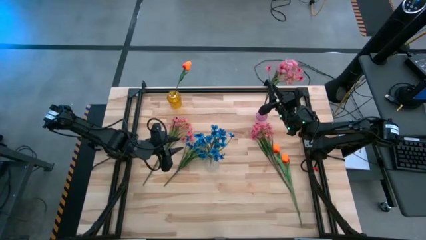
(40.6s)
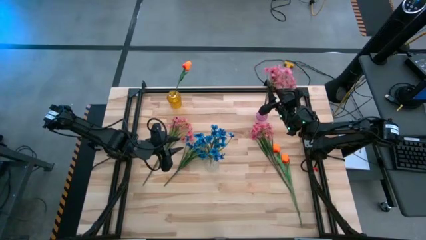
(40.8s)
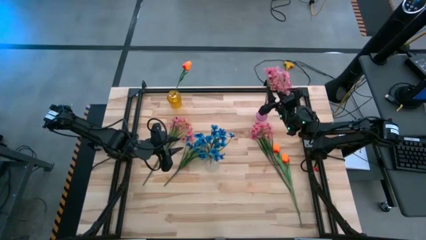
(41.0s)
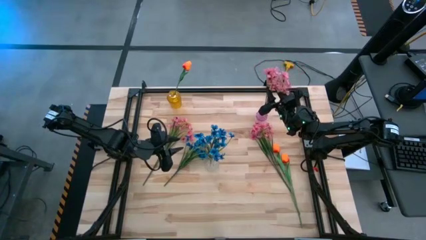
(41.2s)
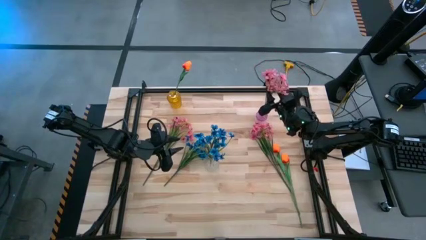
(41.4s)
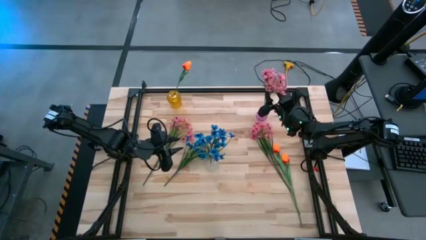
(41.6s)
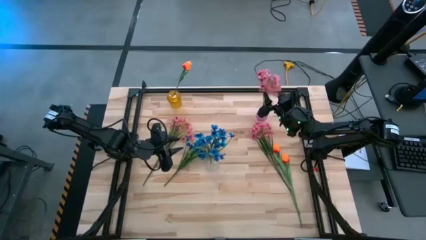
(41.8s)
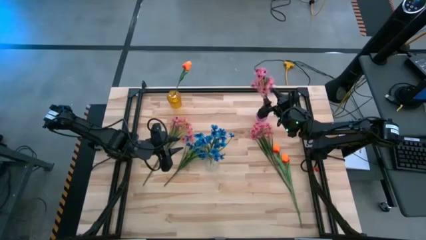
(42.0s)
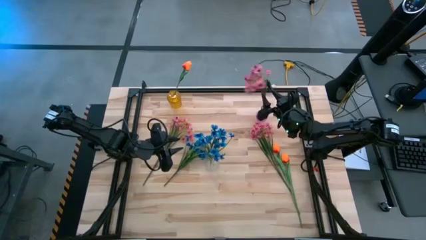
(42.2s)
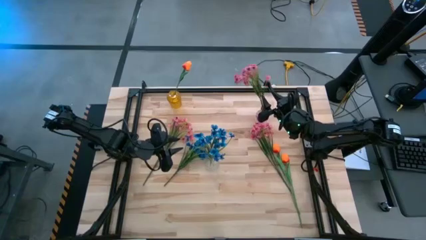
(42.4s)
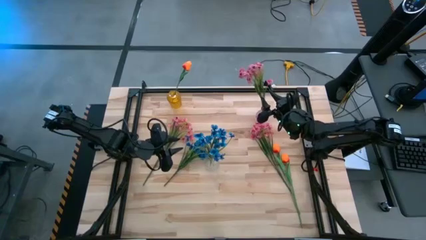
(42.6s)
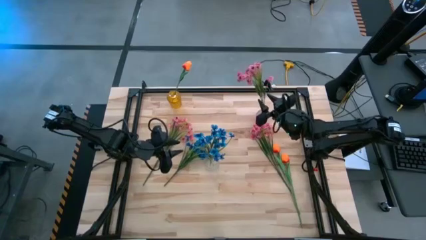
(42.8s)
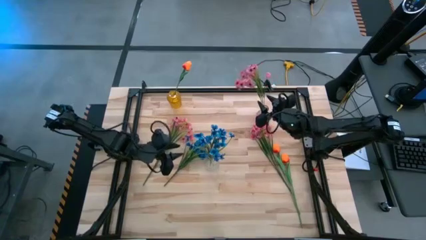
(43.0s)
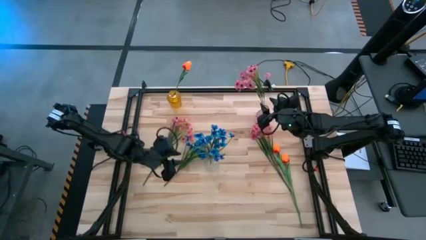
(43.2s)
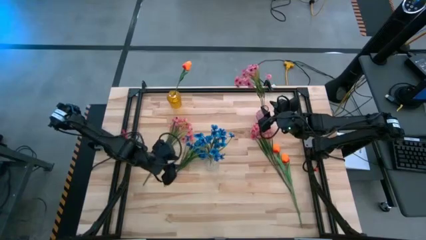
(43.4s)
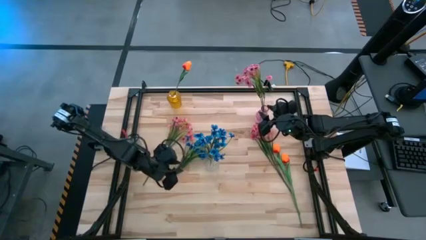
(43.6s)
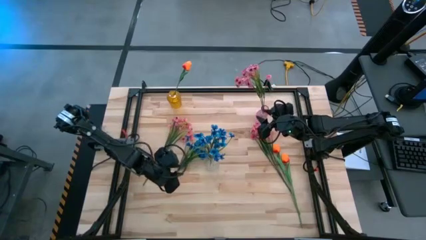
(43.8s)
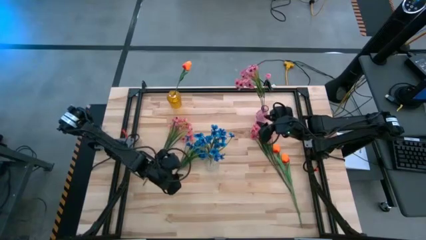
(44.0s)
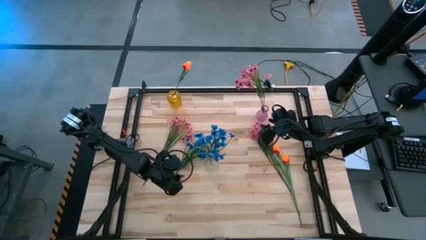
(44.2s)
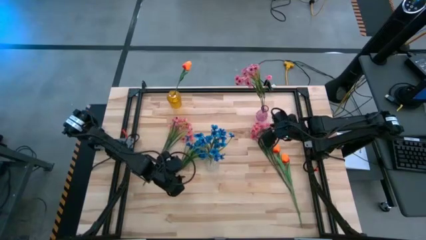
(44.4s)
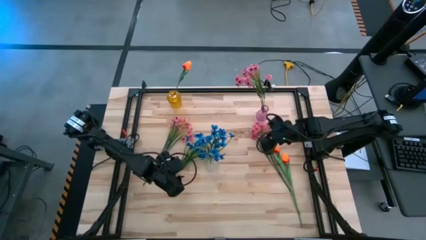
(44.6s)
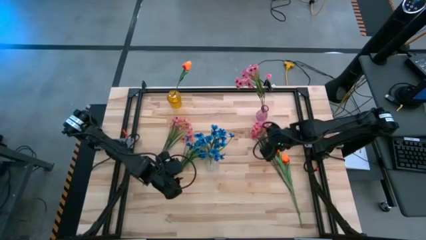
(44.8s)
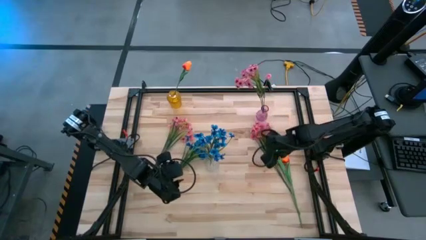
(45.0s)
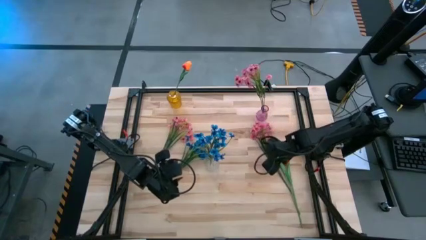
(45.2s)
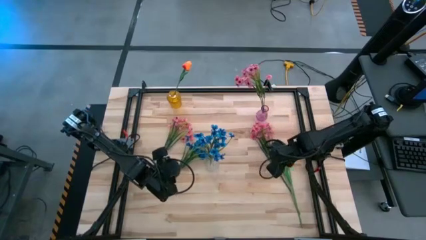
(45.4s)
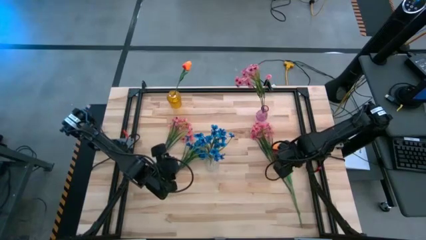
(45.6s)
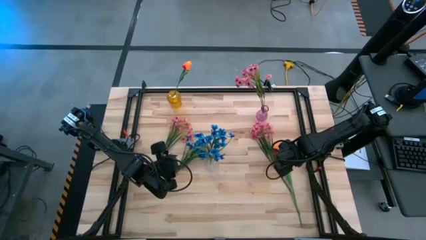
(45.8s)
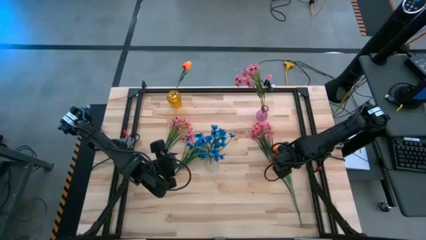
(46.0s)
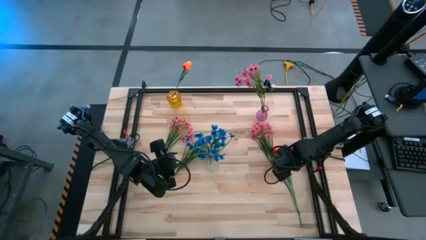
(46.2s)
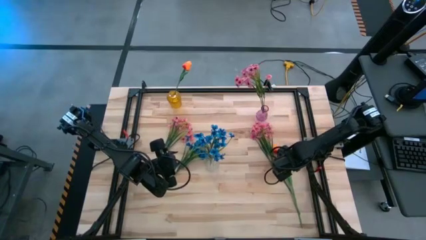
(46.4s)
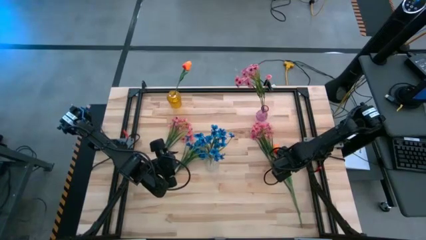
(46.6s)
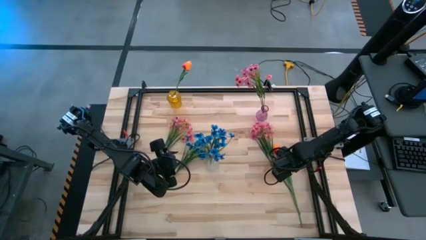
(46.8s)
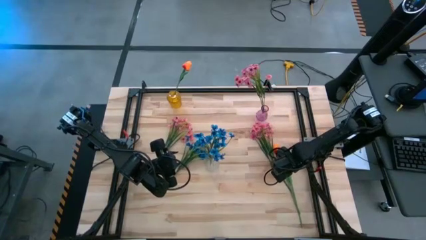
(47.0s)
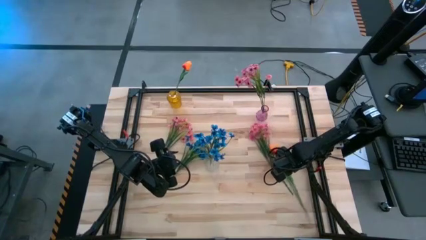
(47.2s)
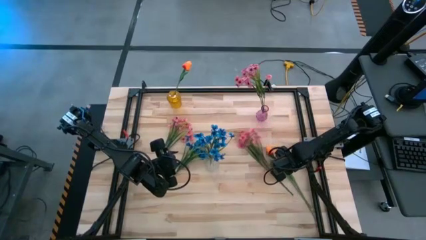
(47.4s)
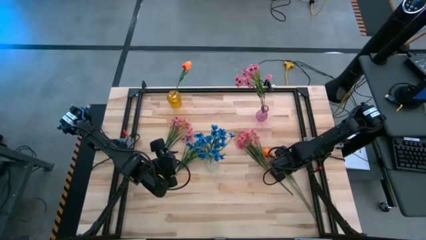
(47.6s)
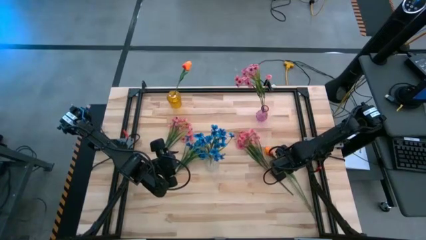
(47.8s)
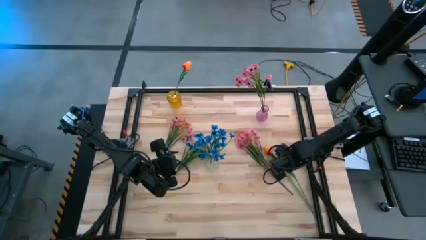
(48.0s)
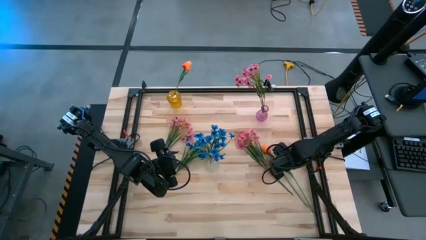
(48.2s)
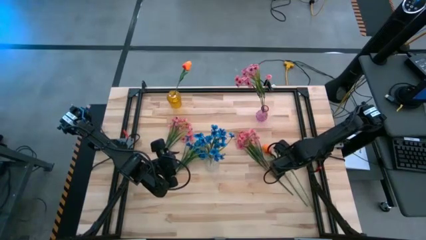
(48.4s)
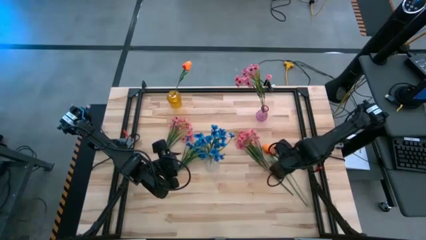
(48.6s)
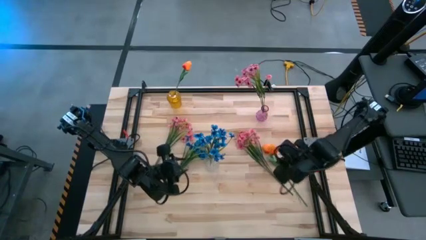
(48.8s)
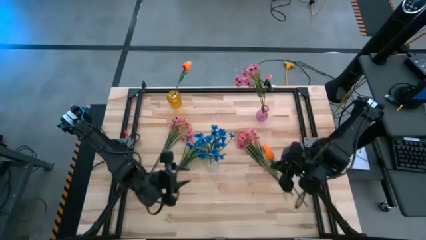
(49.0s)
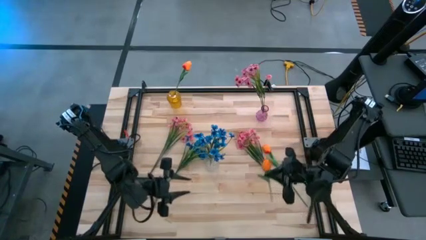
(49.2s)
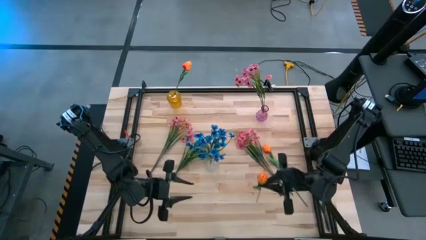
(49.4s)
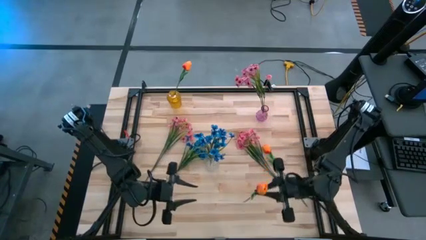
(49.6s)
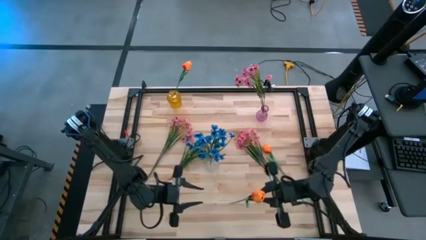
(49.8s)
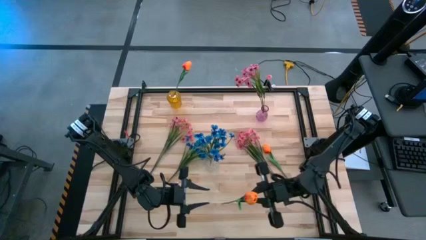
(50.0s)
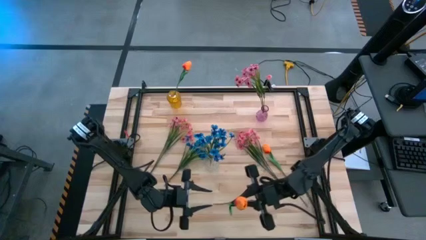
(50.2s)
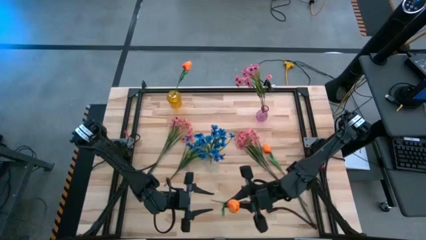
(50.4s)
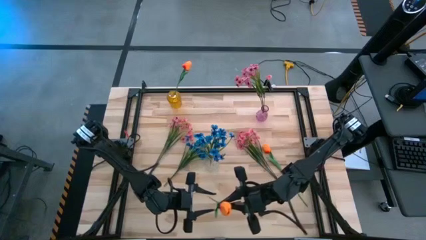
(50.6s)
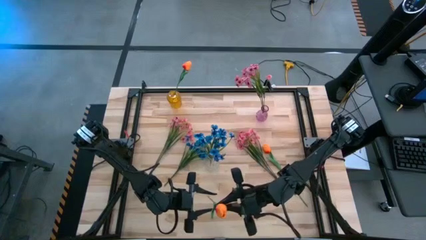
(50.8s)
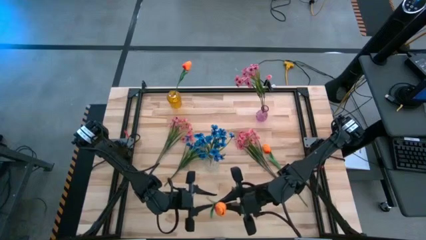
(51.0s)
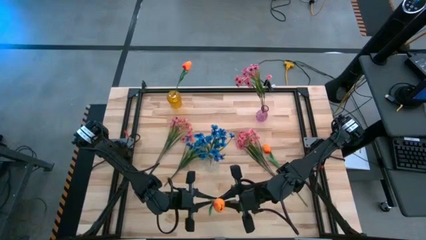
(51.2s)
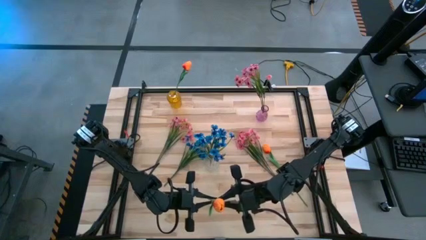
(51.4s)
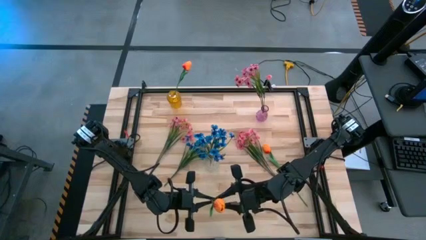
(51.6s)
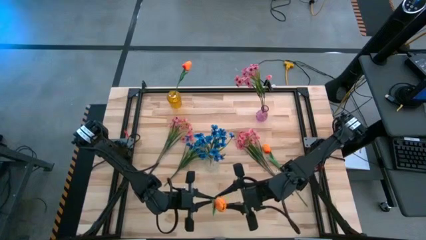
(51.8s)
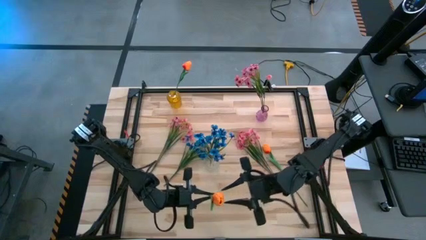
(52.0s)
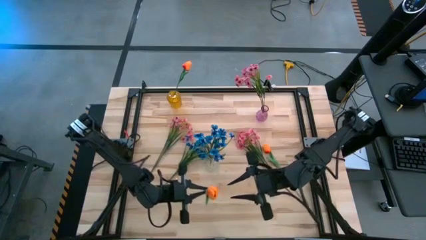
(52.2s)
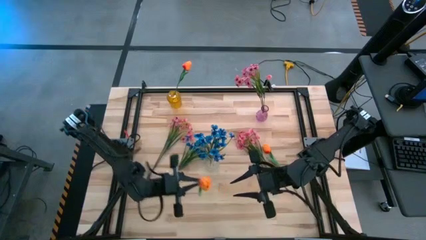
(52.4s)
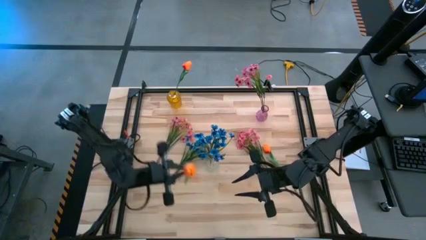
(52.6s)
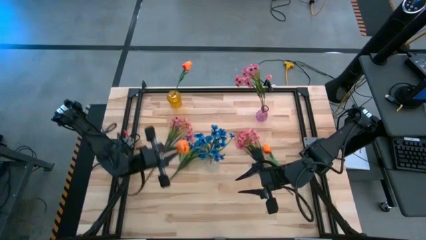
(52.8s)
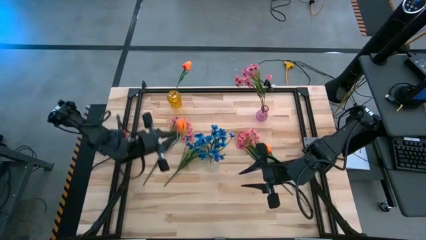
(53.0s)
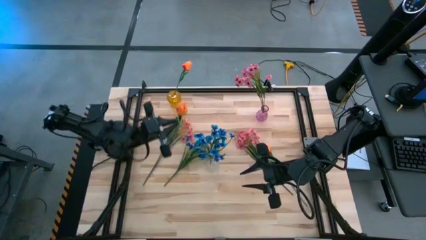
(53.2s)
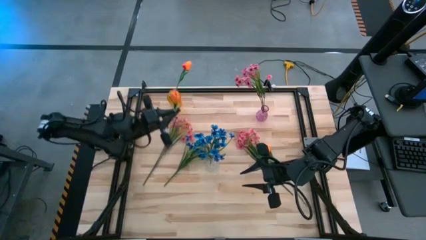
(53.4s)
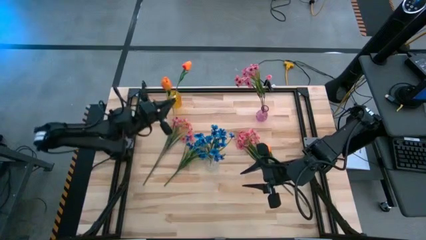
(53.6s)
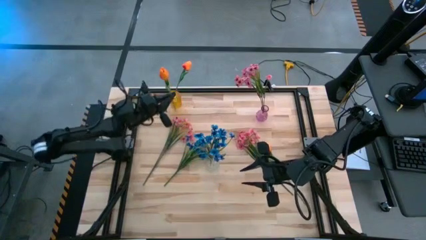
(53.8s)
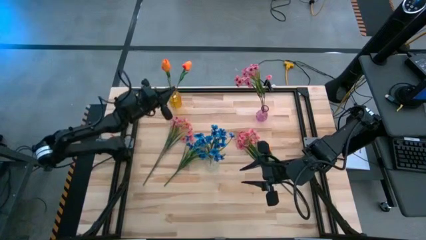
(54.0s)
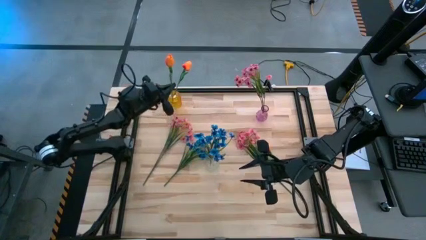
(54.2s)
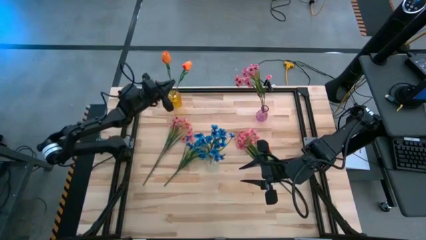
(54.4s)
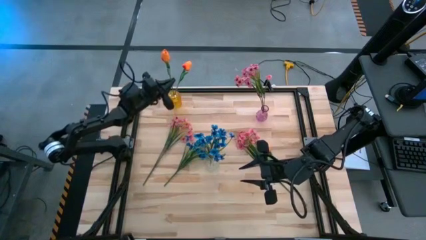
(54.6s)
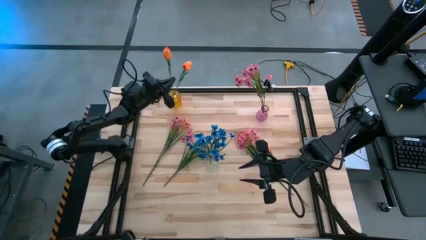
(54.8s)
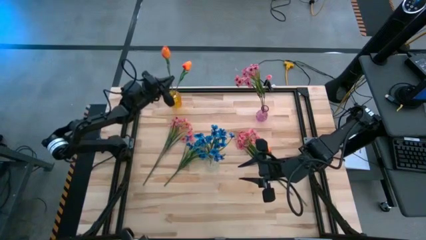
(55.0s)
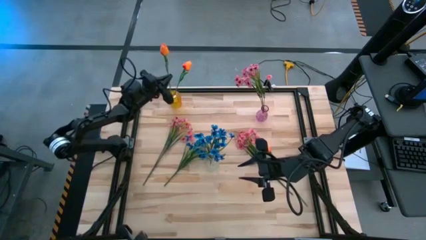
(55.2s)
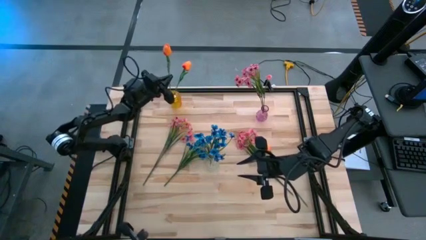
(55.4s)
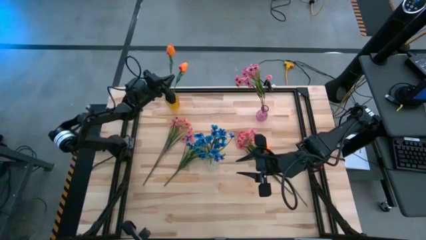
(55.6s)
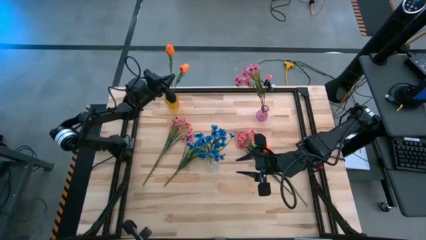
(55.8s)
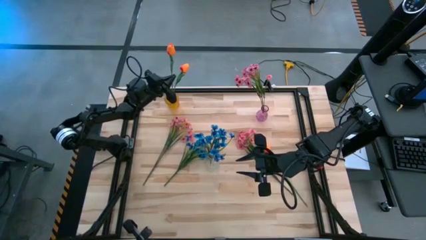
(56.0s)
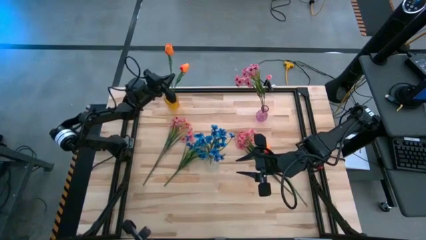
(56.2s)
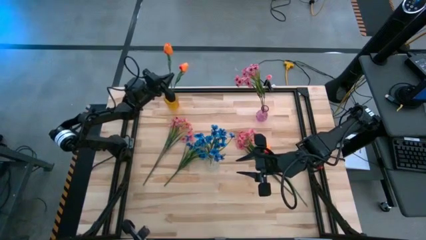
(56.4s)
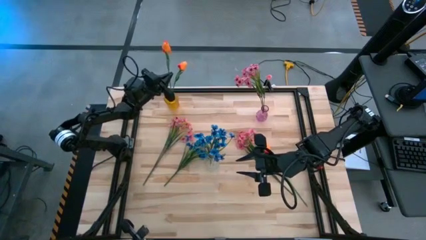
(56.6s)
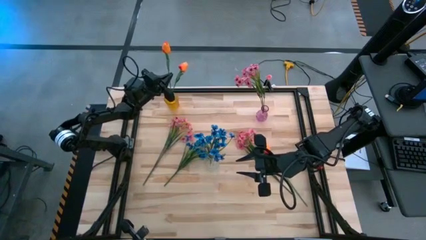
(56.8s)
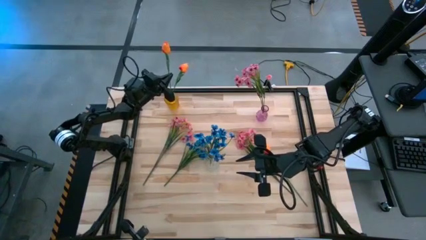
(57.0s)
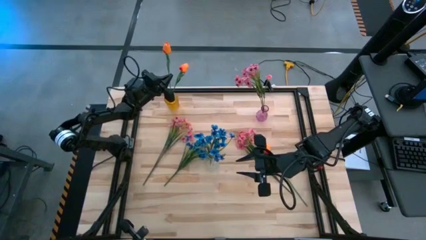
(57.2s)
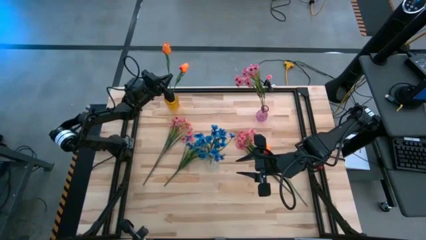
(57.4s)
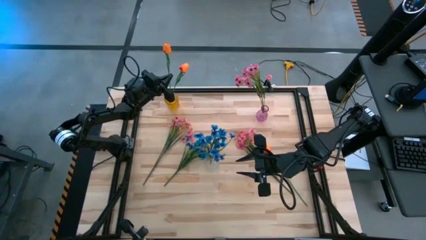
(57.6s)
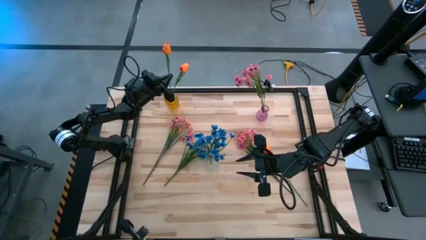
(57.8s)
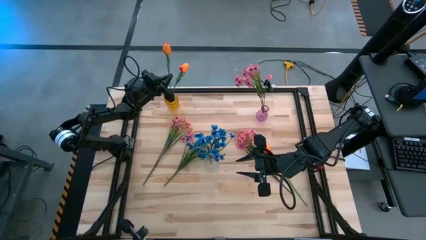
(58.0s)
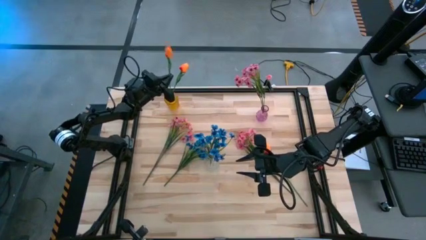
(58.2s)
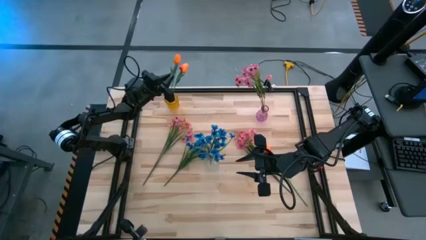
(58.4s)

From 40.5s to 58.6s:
Task: Sort flowers into vase by color
Put the right orange tulip into the yellow vase
